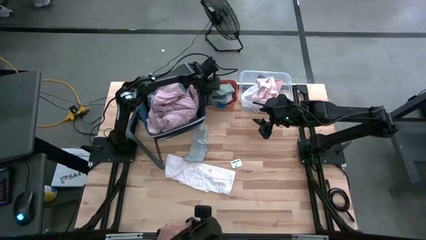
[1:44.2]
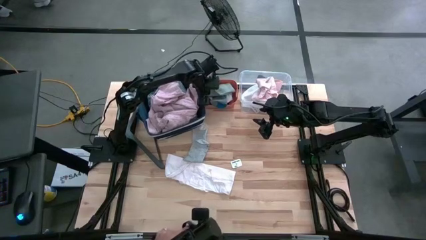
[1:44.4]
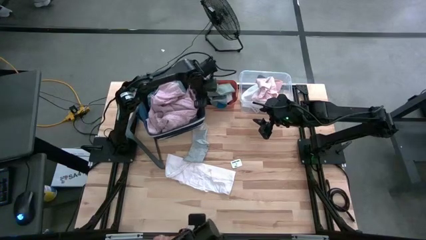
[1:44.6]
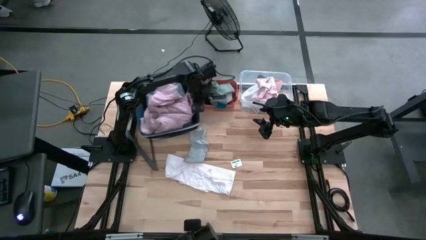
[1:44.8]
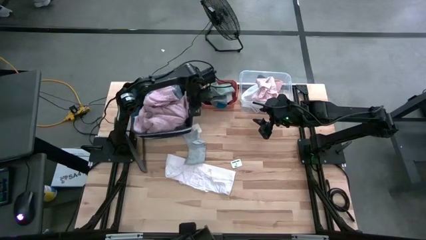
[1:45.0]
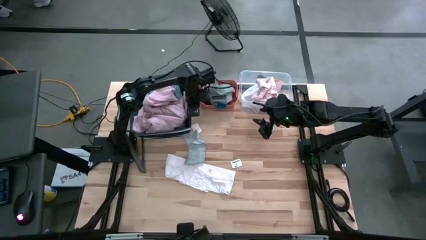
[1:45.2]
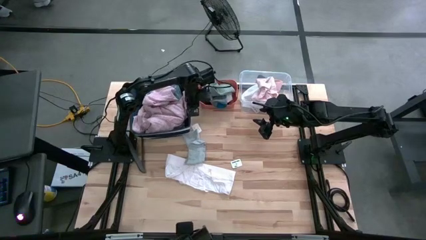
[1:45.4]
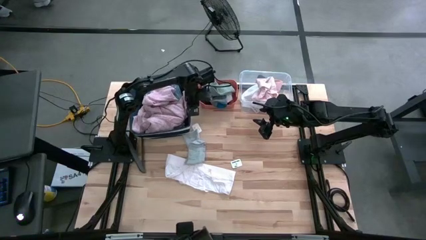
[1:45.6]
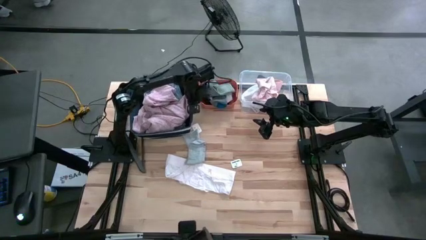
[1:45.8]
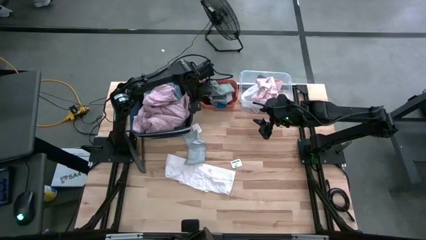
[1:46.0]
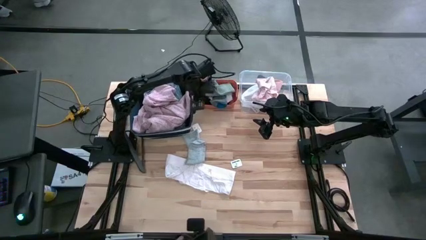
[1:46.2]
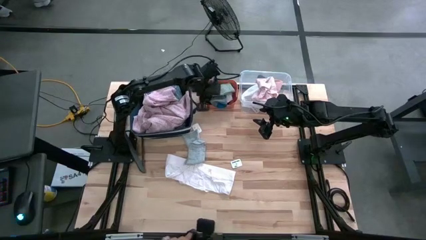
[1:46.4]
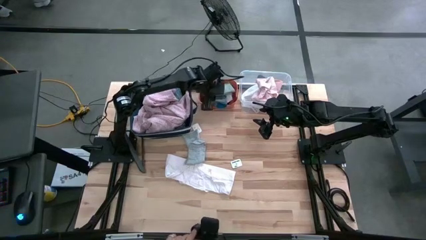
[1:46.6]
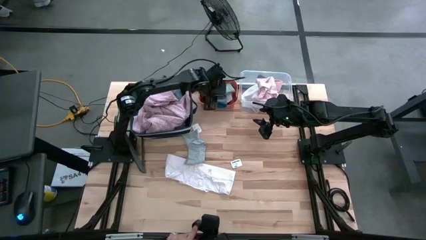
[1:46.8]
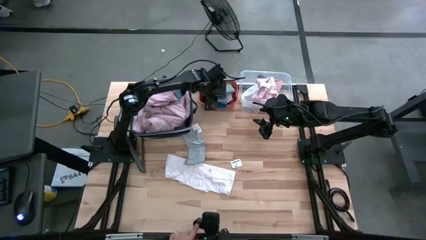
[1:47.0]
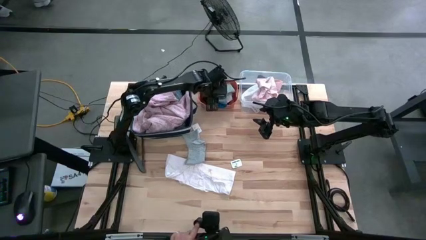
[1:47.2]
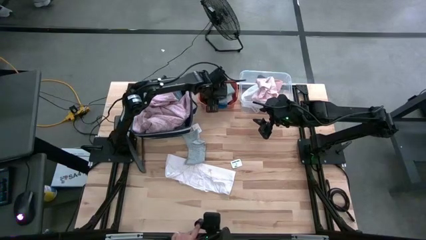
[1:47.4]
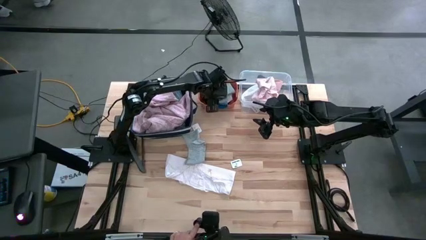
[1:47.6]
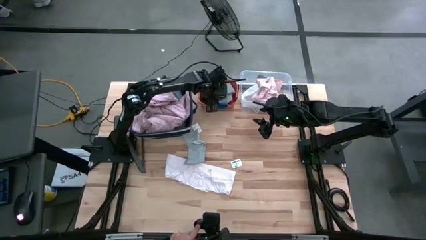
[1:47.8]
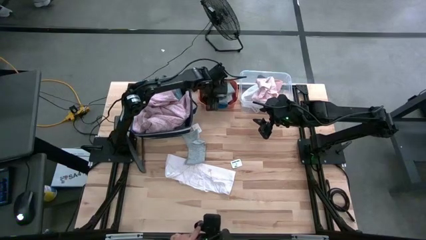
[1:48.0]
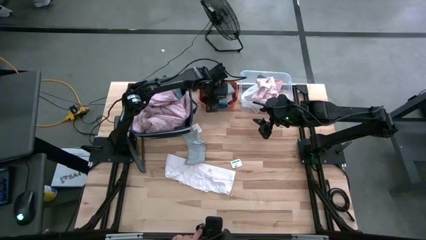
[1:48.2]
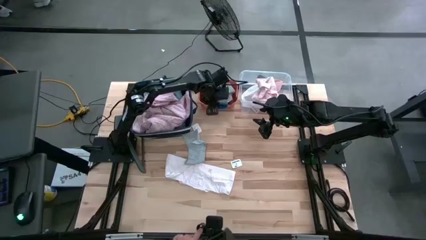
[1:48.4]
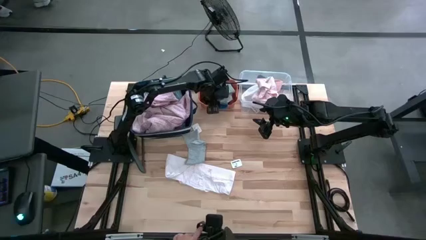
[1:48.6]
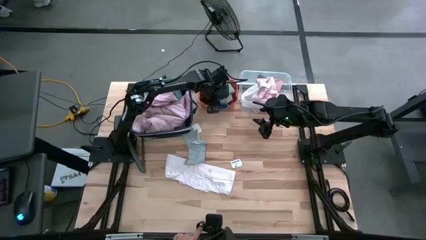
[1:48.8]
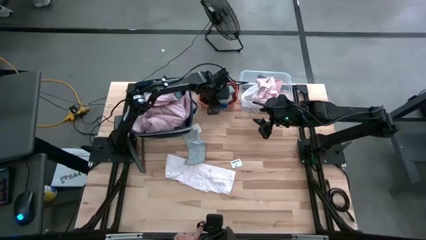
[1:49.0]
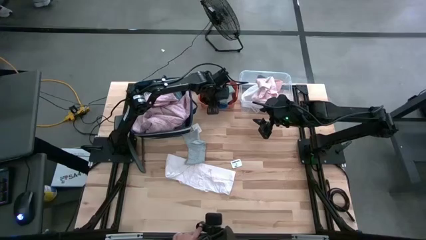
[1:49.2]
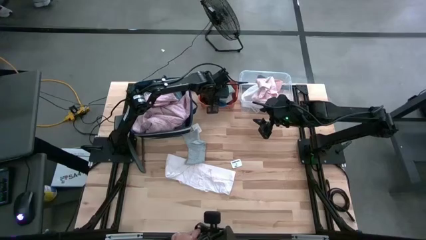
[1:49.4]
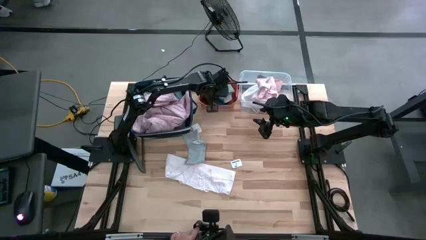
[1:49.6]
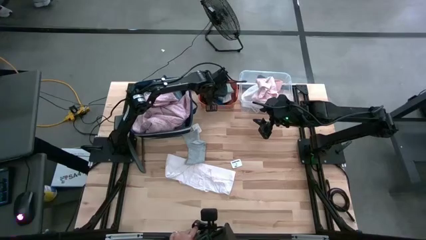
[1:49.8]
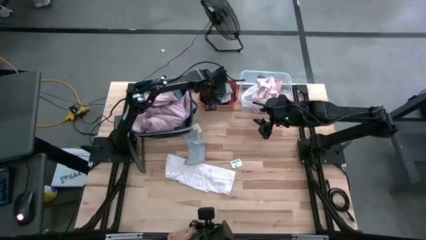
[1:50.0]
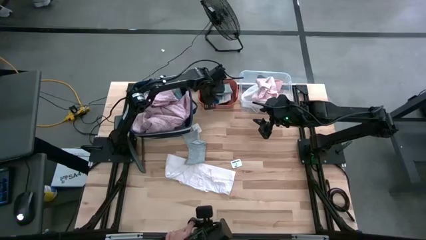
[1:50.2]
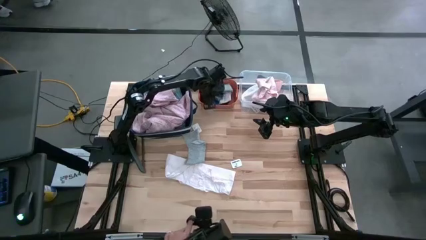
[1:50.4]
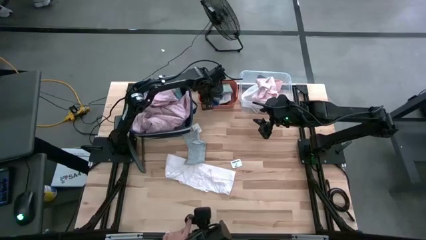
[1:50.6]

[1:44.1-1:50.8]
Task: Pick & Place Cloths
Adjust the socks in the orange bin

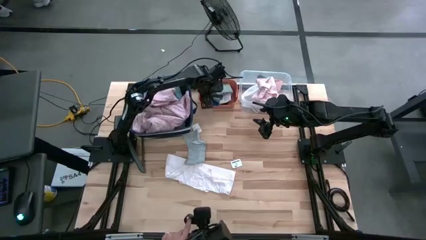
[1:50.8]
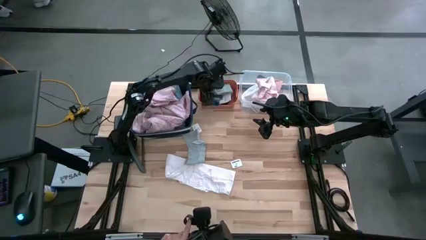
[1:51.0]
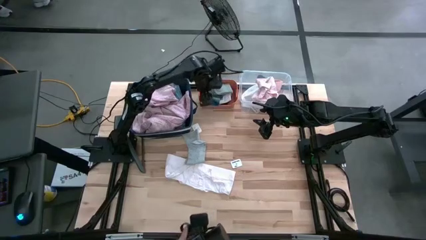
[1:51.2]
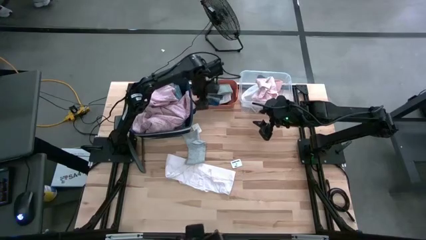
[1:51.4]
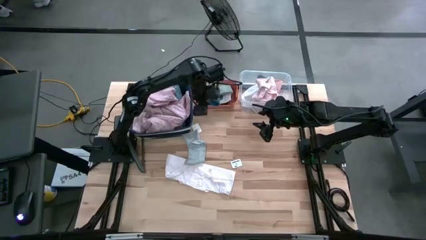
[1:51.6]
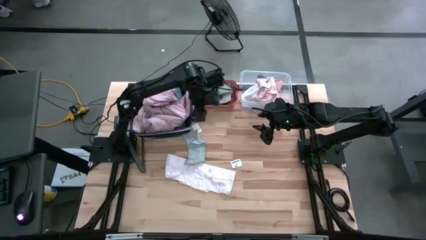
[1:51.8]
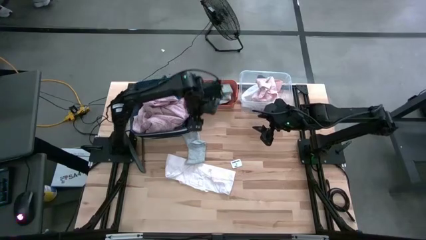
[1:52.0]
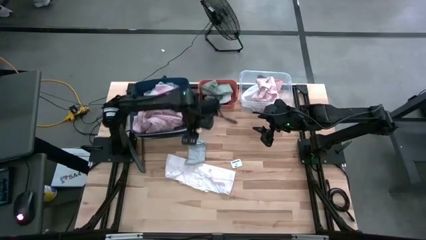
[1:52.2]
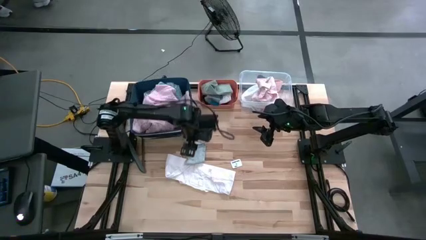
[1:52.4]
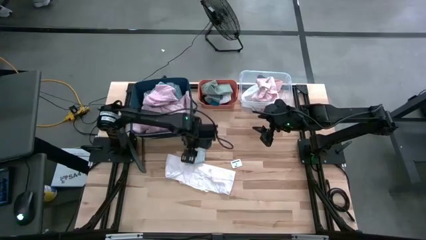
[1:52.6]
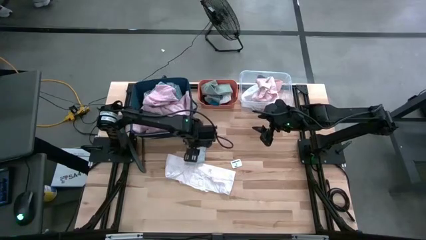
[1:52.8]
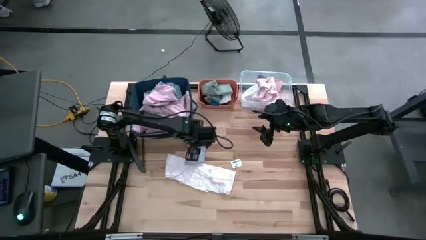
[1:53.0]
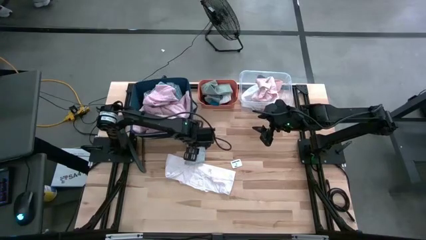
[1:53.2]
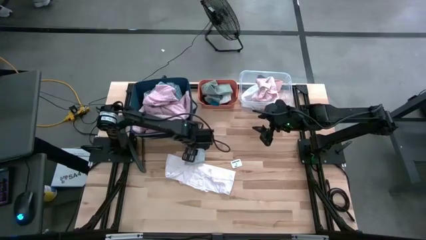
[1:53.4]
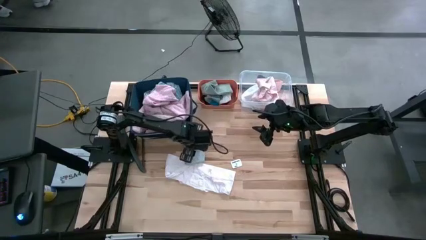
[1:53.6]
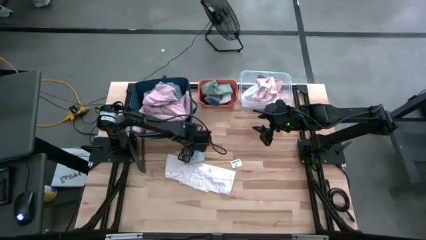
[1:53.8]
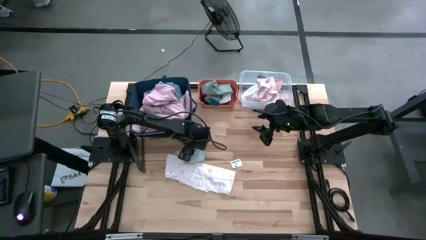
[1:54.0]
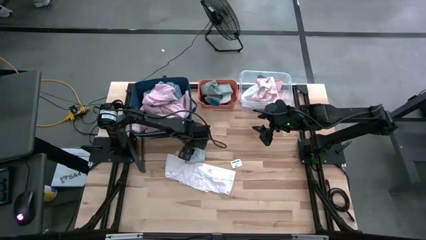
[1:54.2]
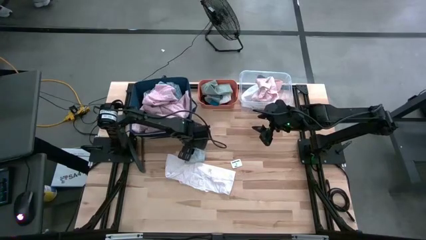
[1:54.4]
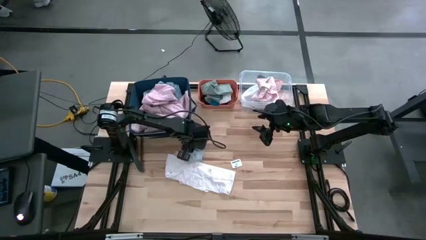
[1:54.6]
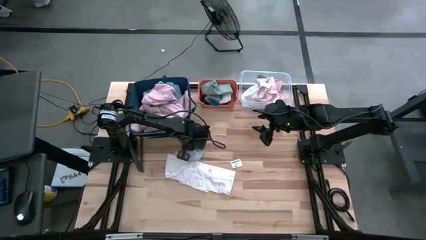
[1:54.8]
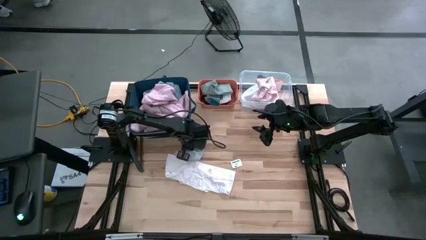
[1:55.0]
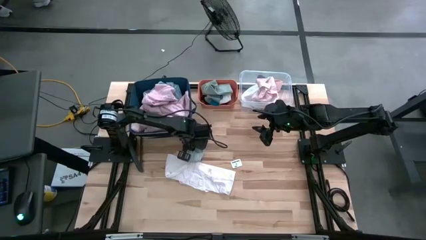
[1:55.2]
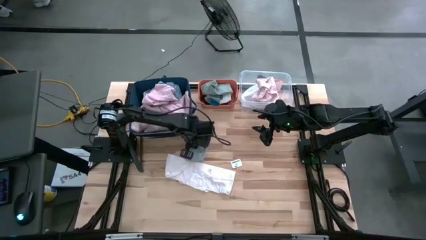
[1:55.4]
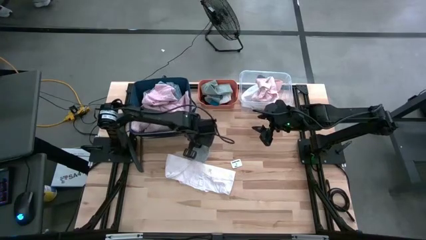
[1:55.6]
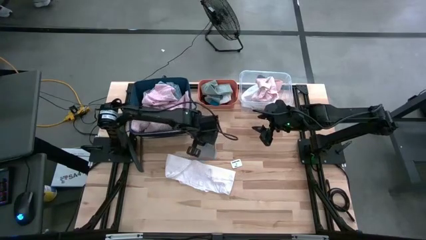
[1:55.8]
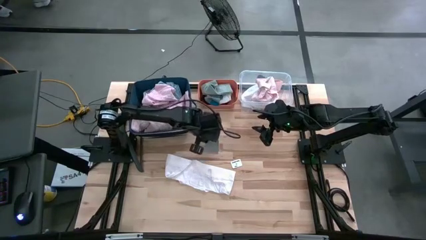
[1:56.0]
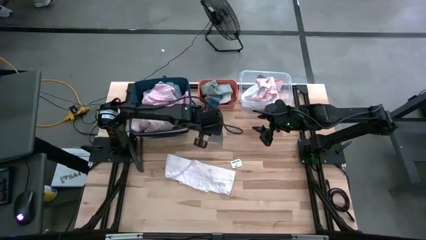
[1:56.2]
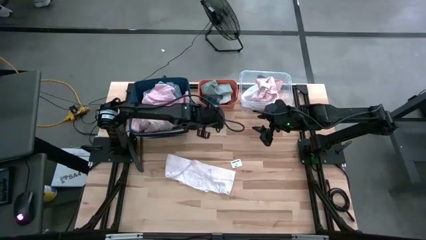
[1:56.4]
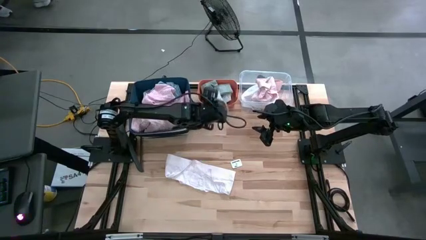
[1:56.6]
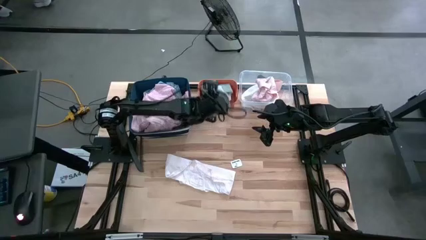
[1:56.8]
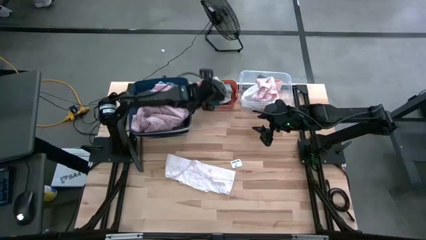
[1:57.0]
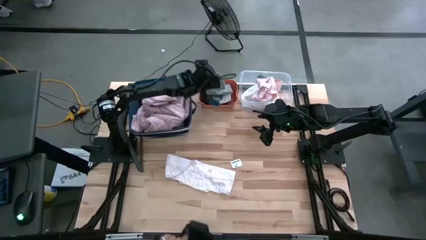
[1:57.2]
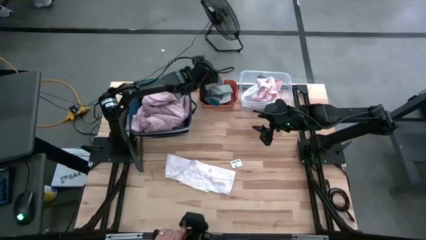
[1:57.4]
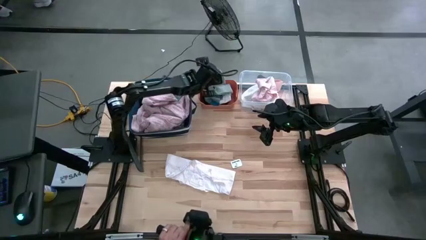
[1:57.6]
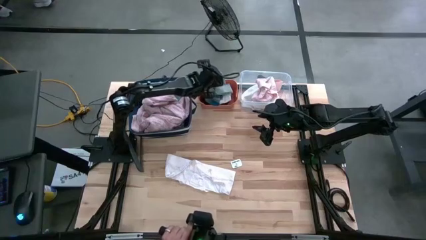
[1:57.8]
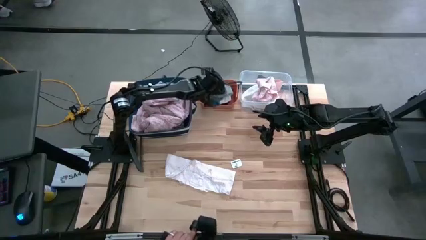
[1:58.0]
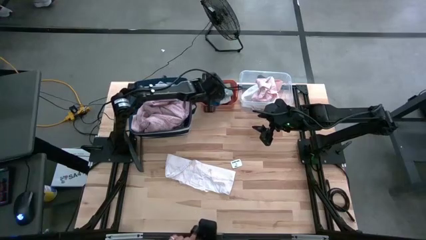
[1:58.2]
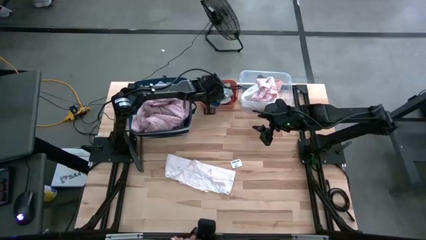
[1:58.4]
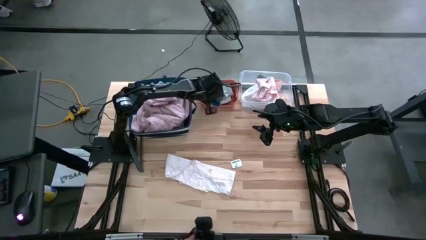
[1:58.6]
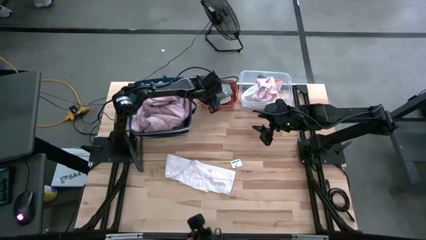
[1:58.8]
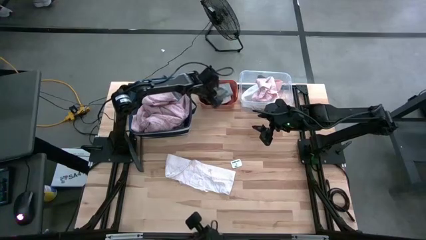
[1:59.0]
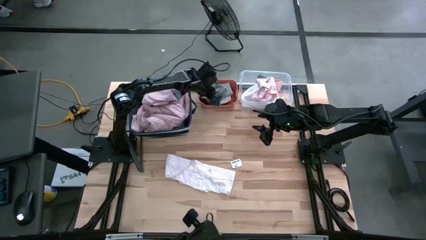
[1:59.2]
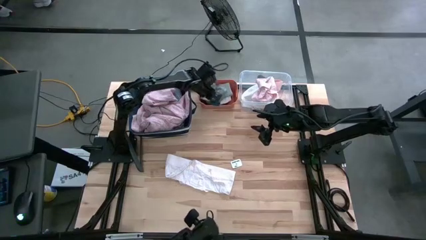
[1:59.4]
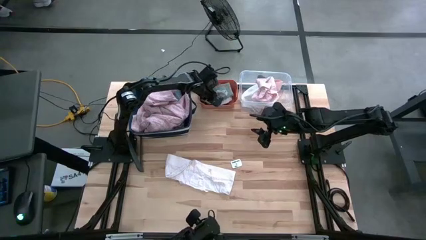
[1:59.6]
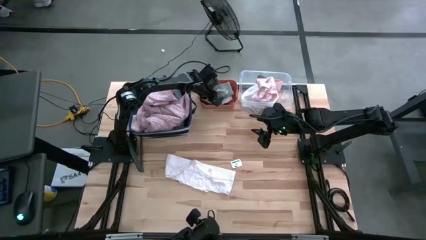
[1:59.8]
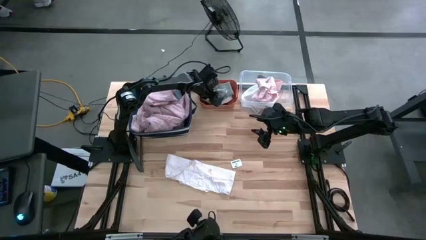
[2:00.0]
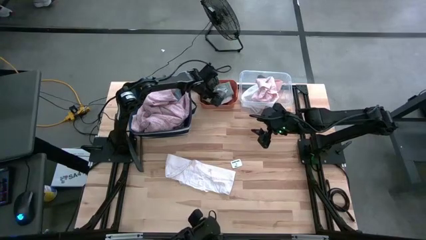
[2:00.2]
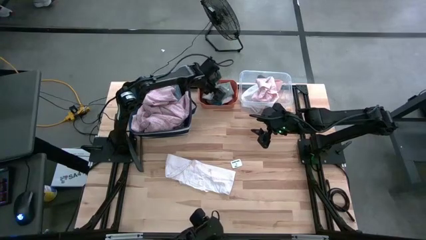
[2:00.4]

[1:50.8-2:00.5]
Put the light gray sock into the orange bin
